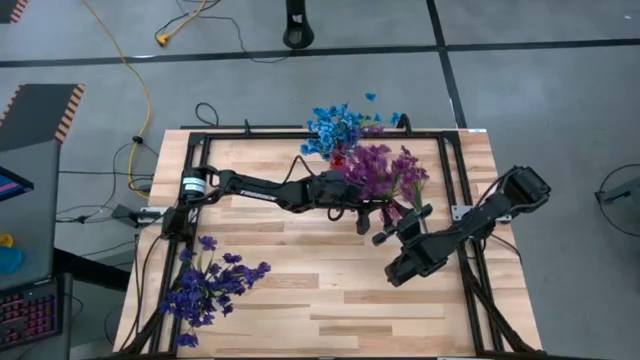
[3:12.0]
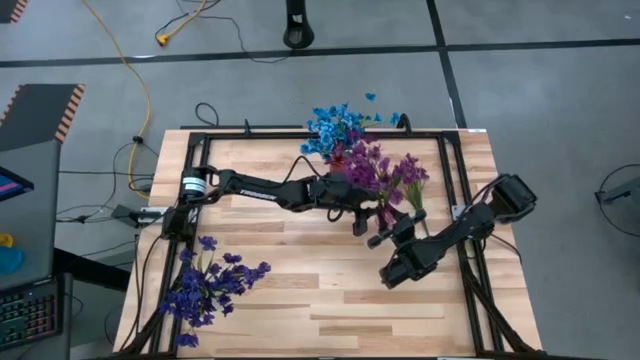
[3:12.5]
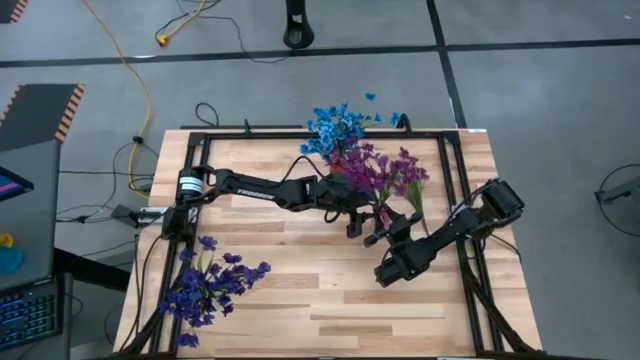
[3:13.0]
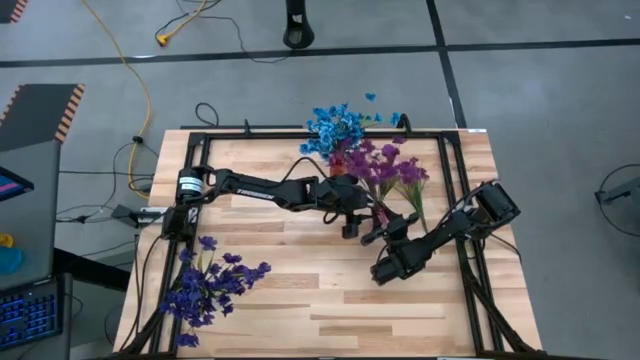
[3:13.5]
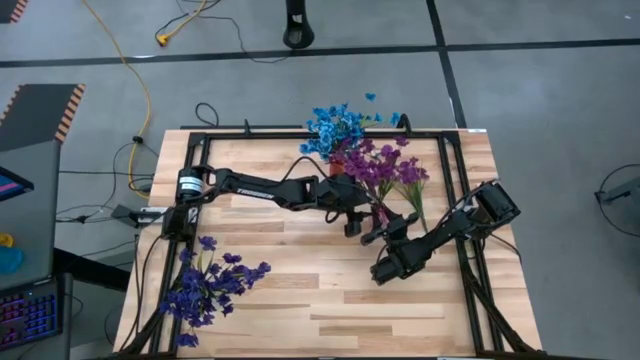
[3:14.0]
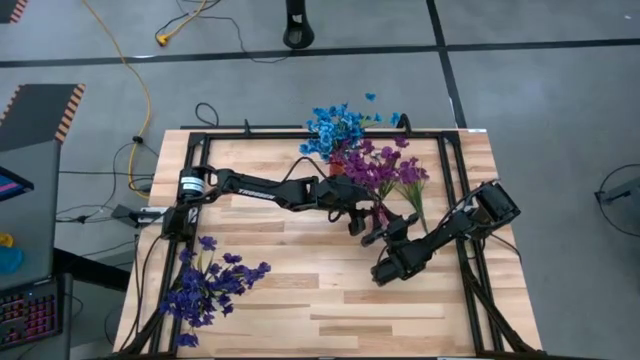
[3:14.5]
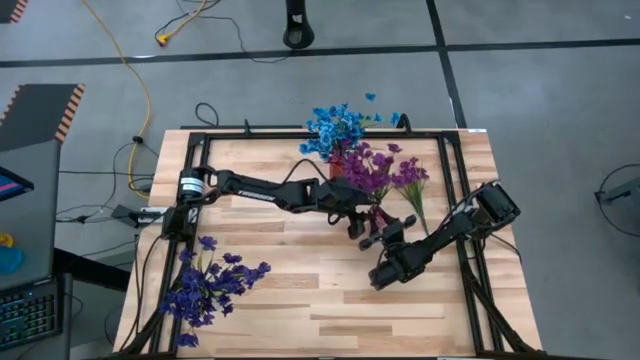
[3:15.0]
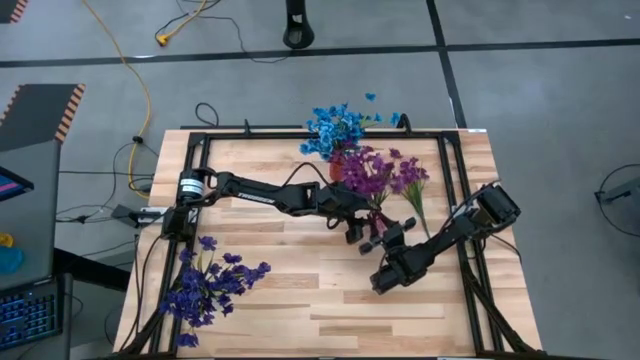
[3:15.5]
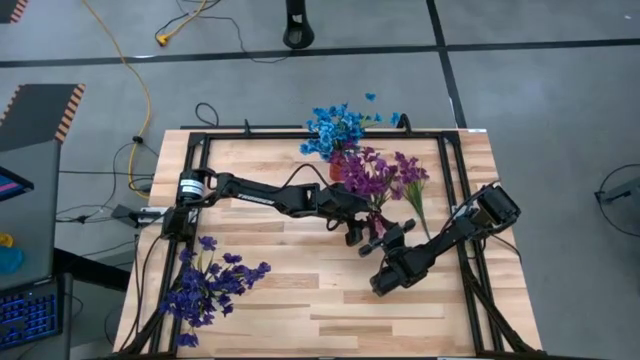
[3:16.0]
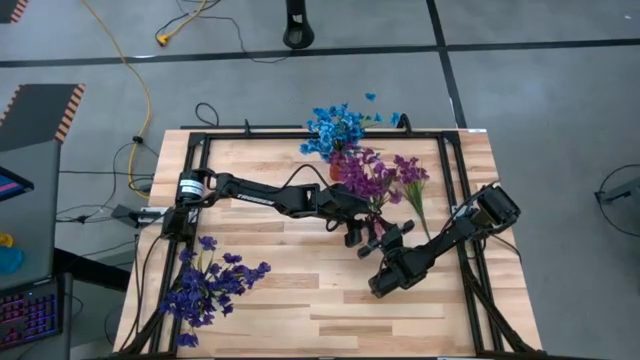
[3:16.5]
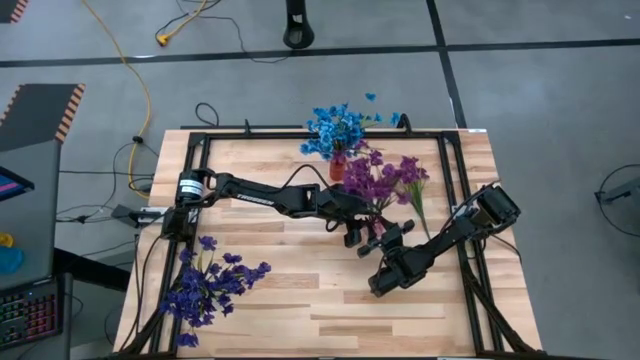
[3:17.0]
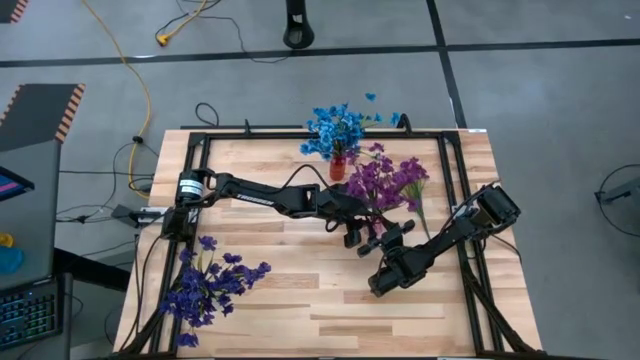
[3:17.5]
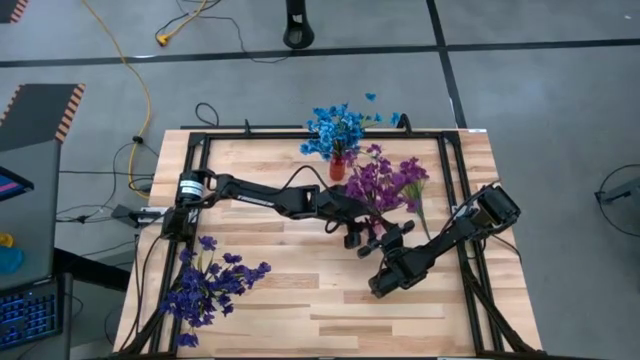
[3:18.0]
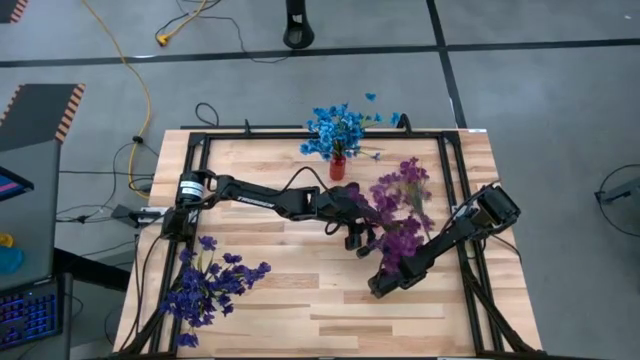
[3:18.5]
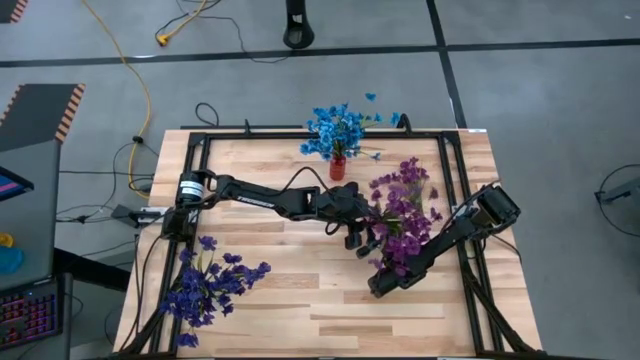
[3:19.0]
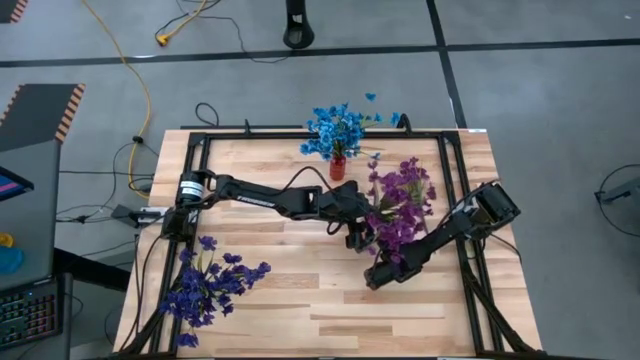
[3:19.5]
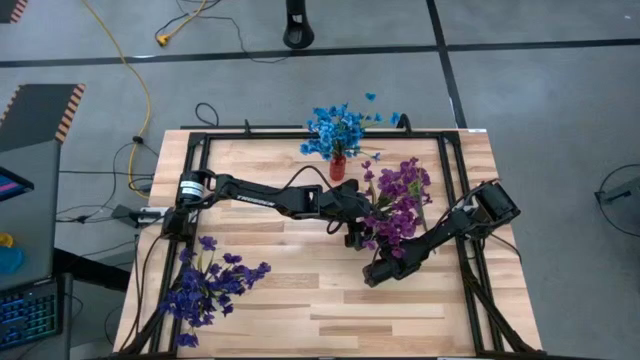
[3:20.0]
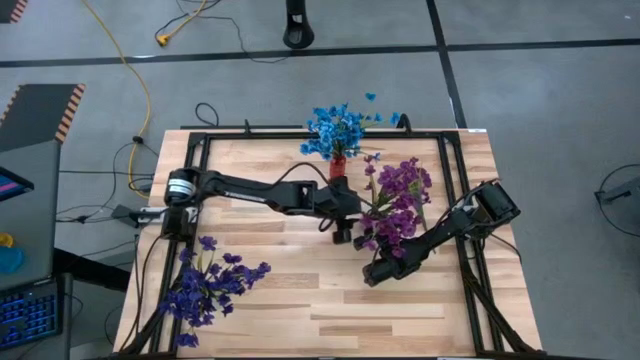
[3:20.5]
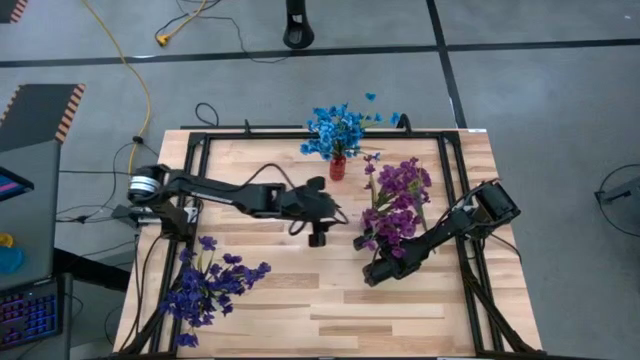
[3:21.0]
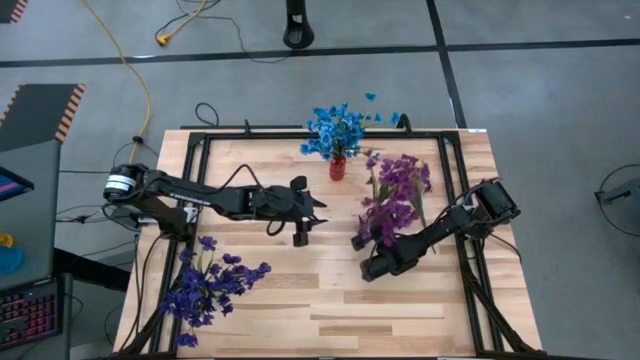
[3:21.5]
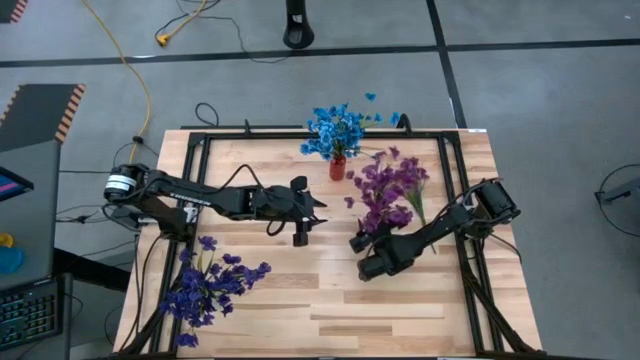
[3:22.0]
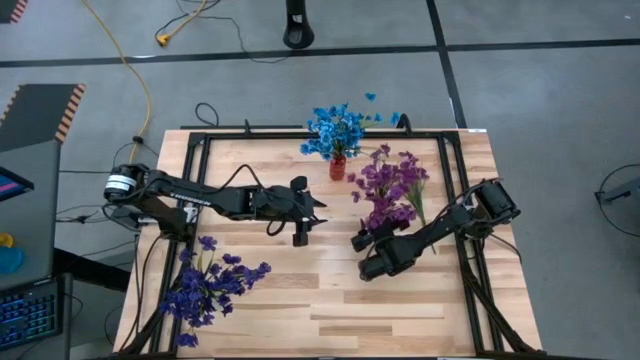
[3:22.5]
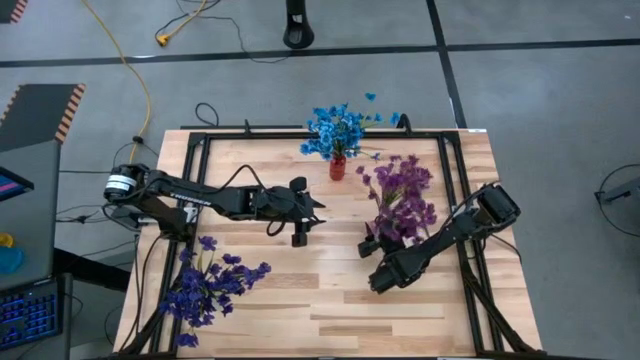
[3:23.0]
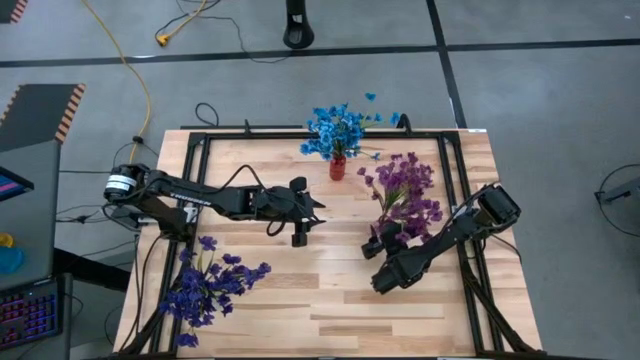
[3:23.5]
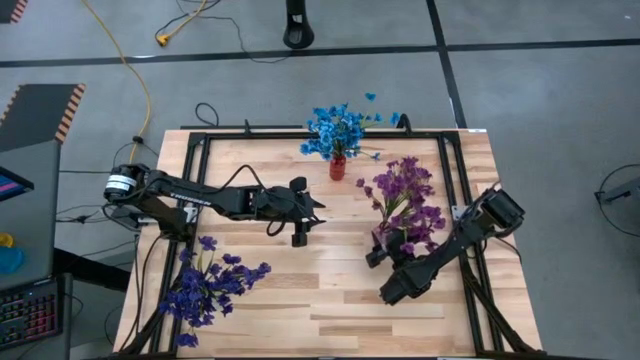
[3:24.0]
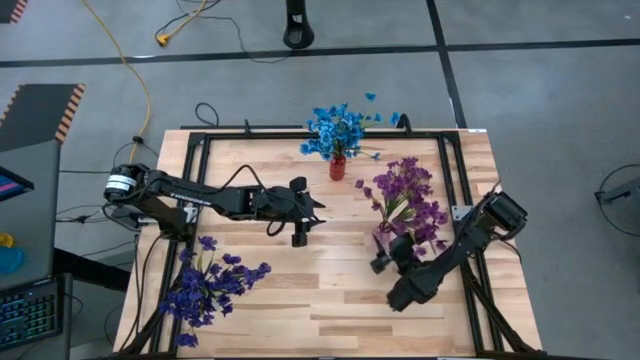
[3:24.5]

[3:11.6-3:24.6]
Task: Sort flowers into vase by color
Adjust the violet vase and the violet flowers inside it

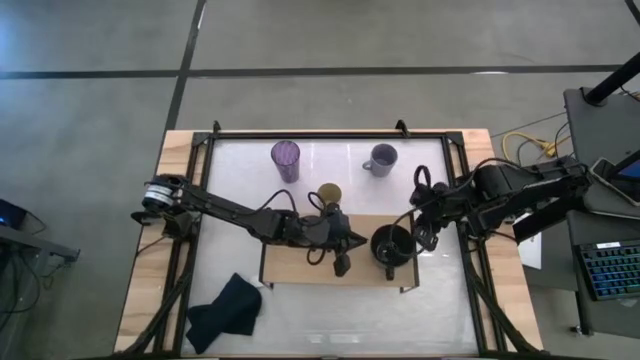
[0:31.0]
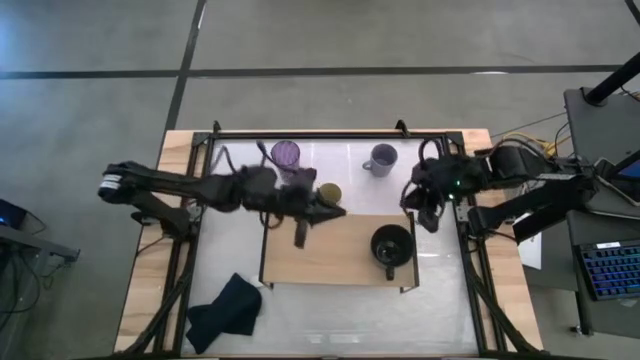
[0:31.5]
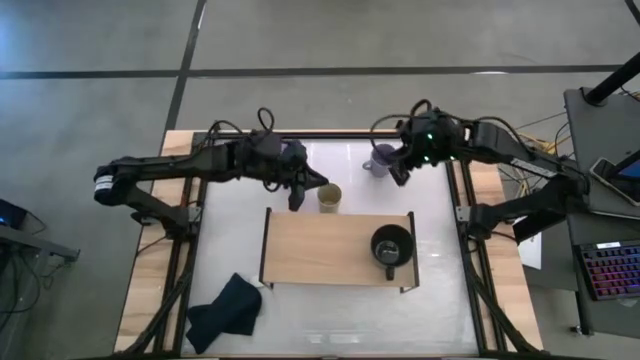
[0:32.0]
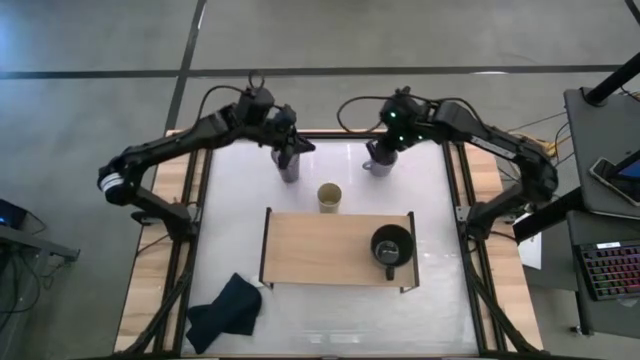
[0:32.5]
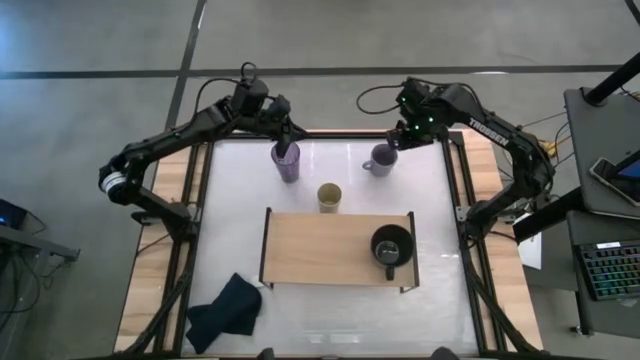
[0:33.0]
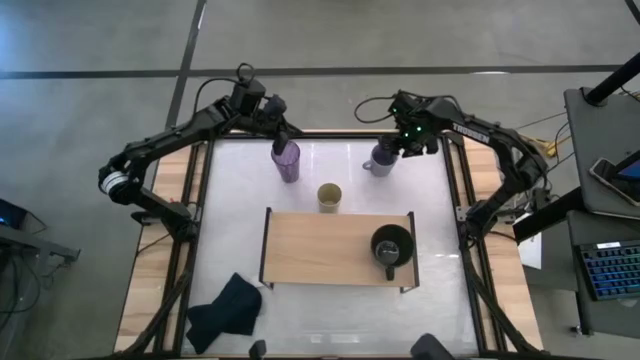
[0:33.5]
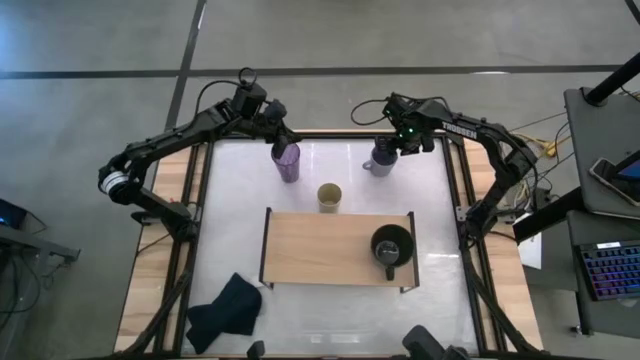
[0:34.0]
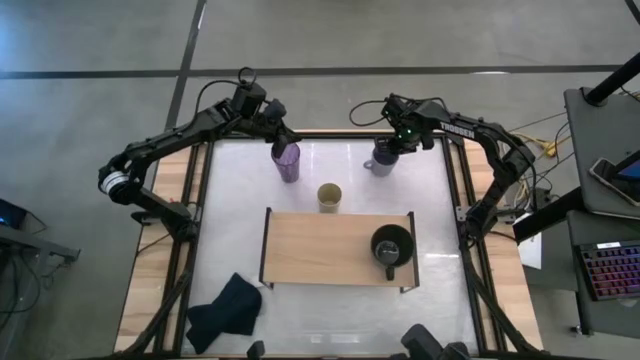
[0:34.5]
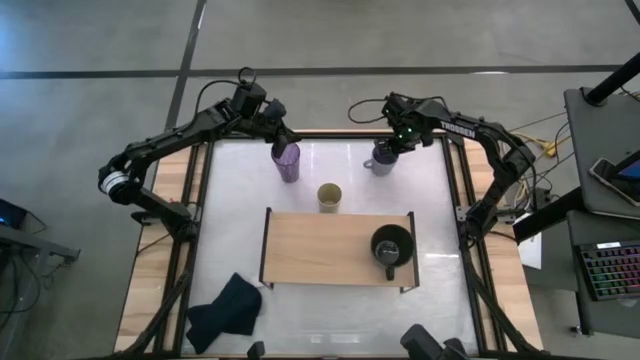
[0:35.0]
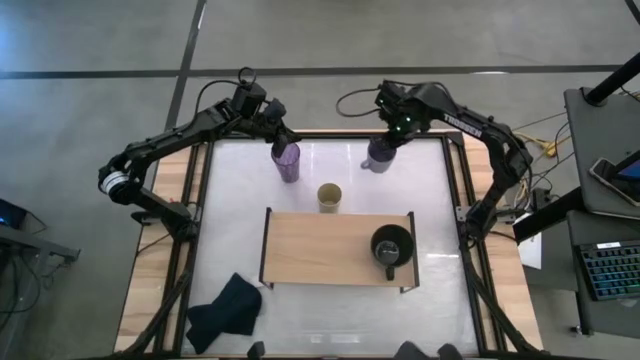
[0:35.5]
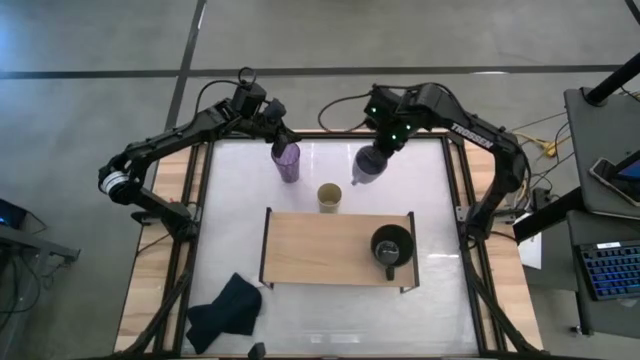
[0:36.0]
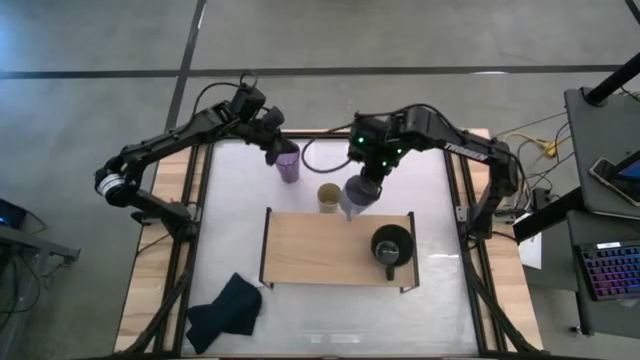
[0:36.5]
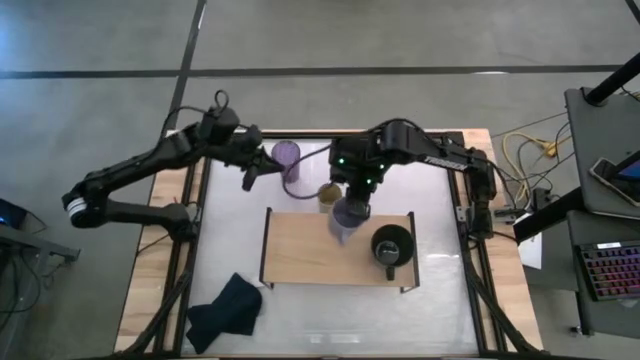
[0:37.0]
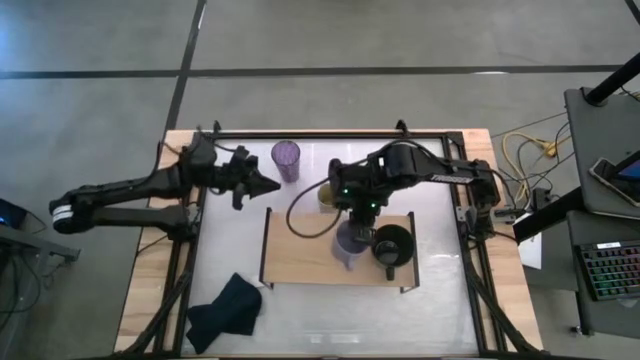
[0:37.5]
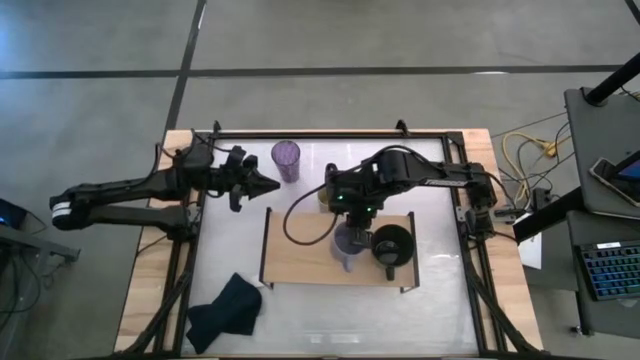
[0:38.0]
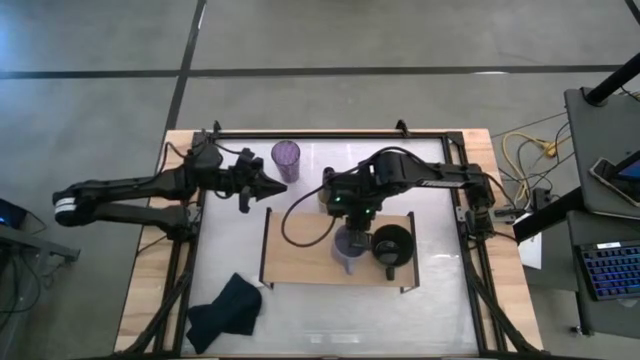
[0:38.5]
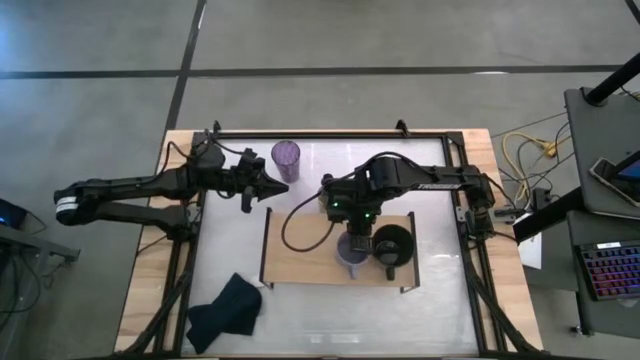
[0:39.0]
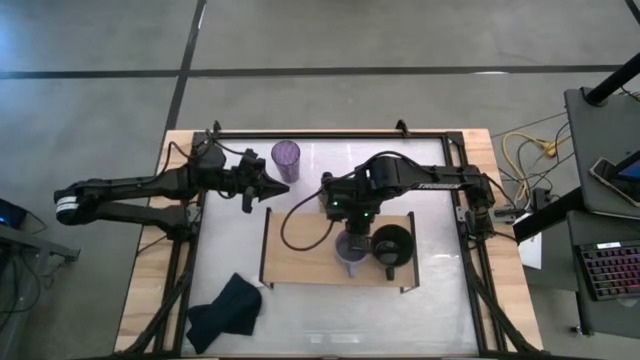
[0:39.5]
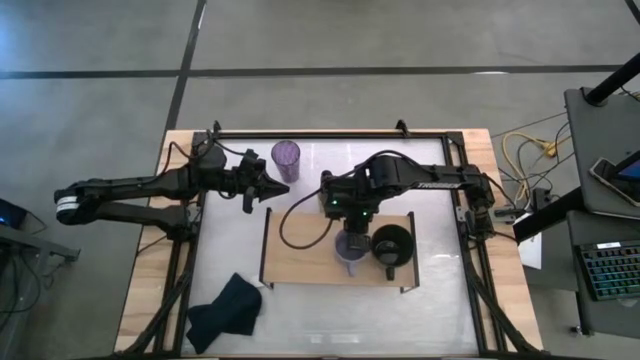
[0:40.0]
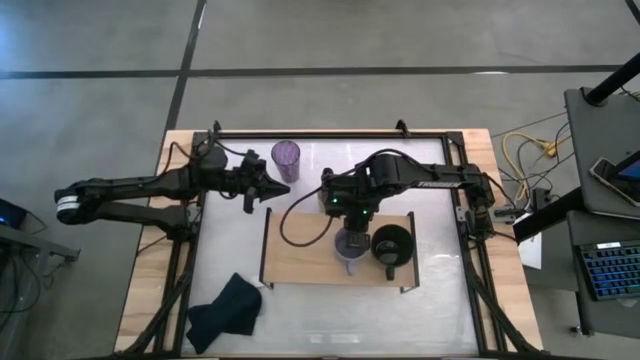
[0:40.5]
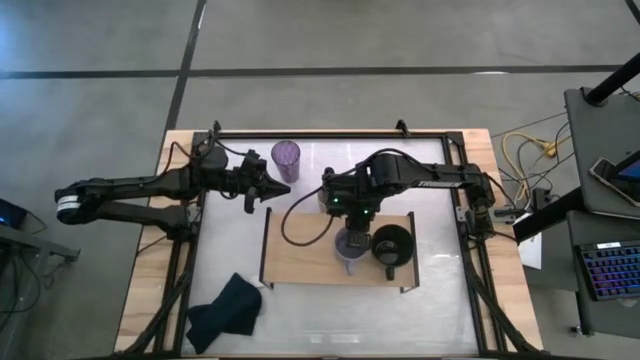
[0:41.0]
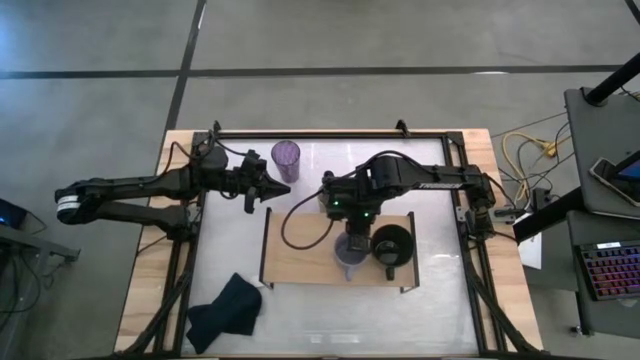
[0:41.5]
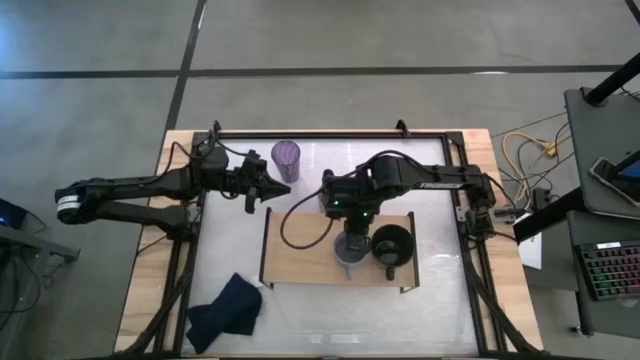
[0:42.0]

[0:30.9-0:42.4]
Task: Stack small to large cups/mugs on shelf
Put the gray mug on the shelf
